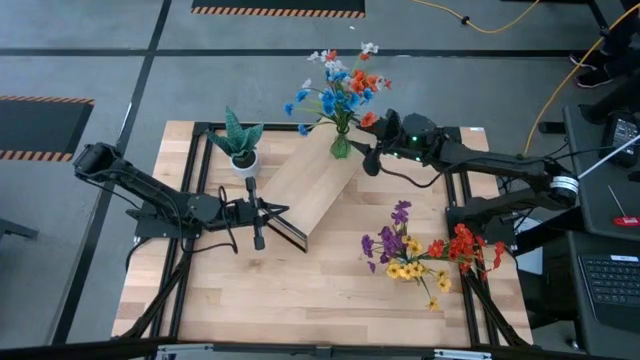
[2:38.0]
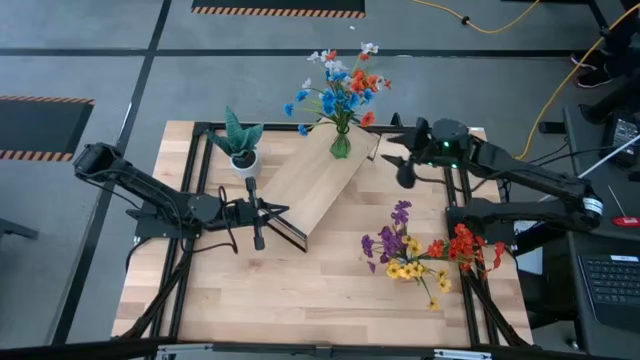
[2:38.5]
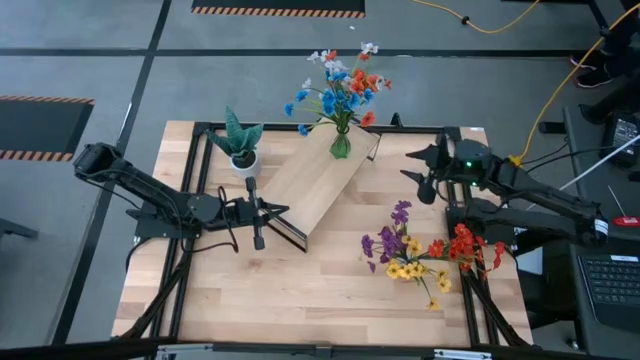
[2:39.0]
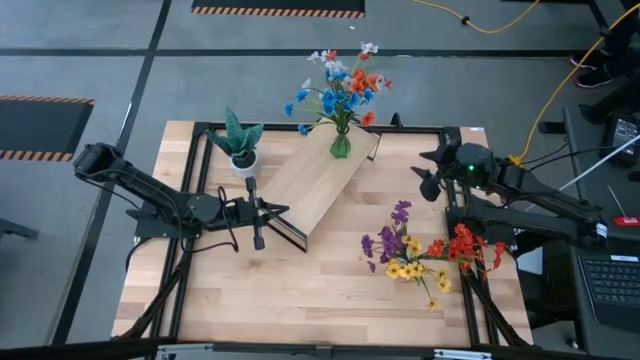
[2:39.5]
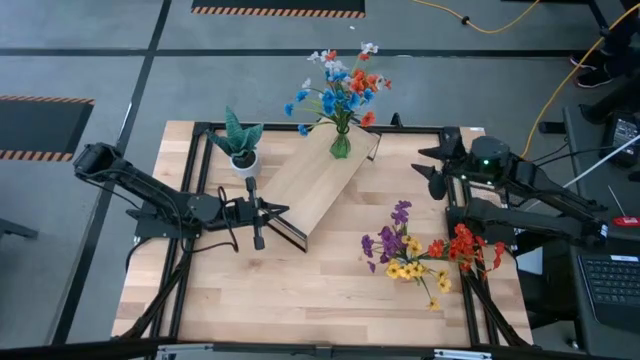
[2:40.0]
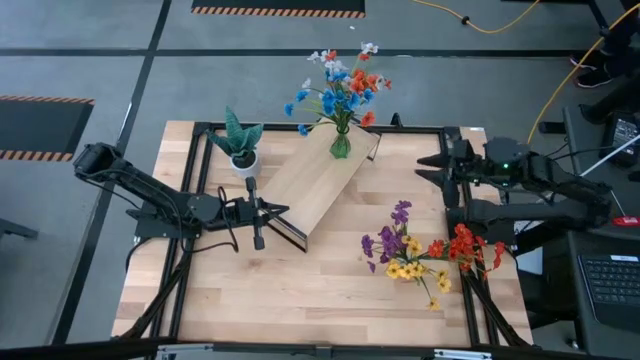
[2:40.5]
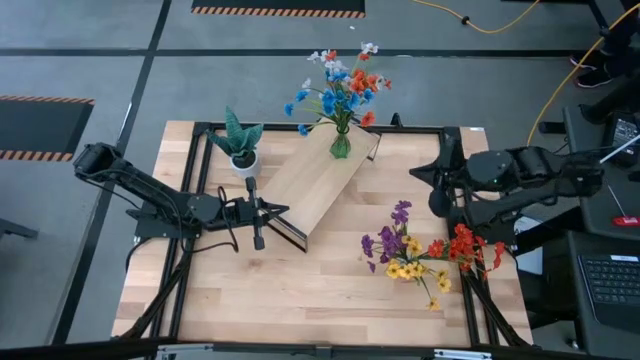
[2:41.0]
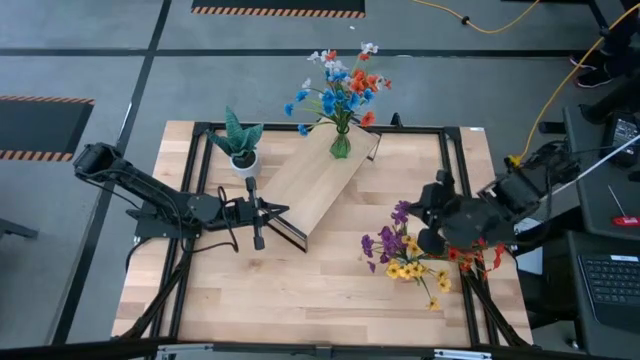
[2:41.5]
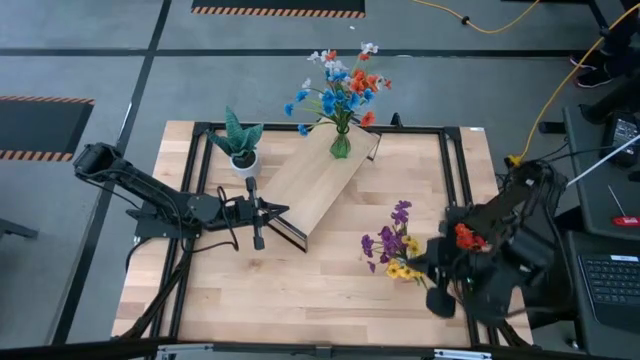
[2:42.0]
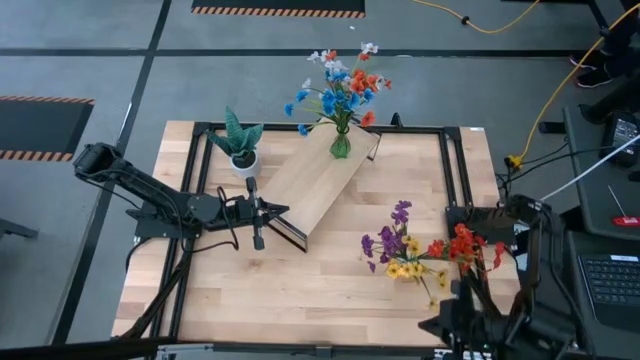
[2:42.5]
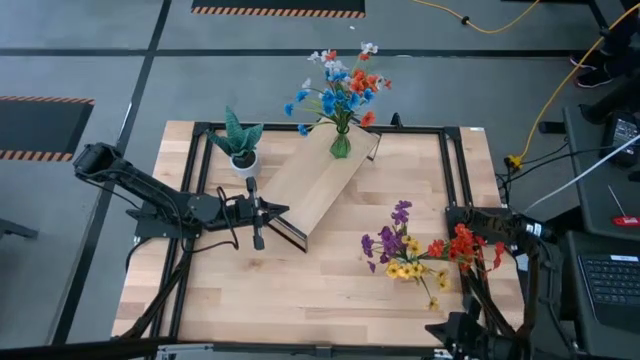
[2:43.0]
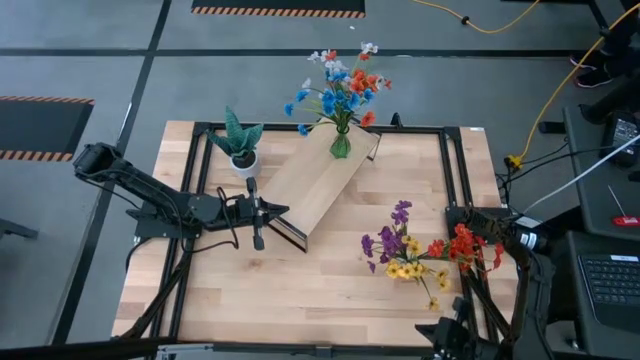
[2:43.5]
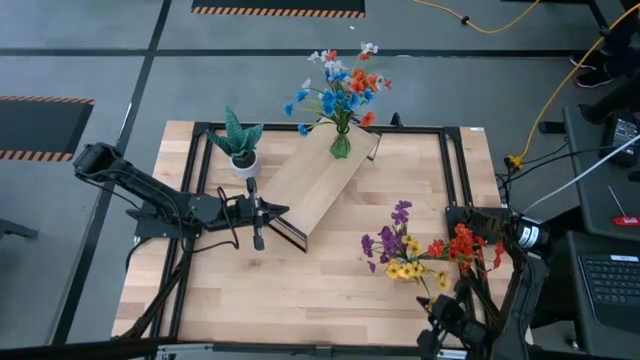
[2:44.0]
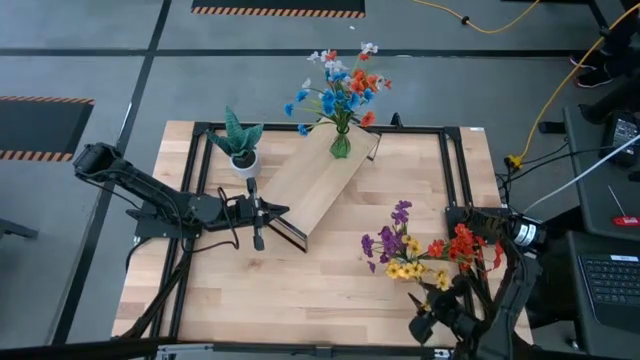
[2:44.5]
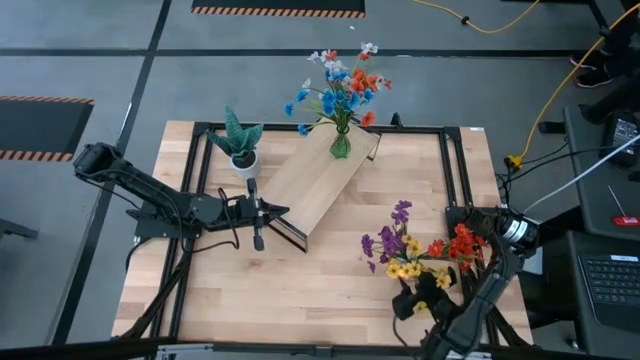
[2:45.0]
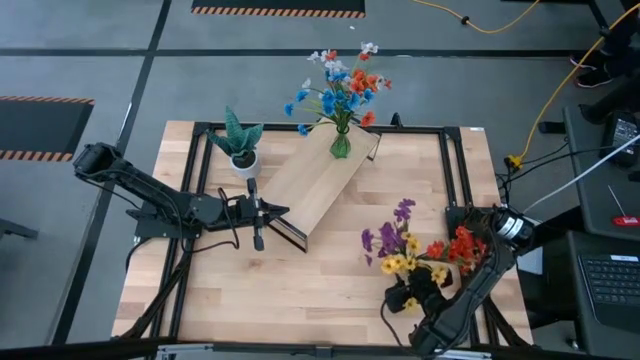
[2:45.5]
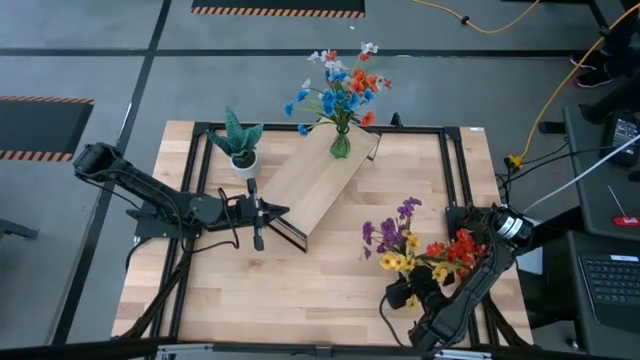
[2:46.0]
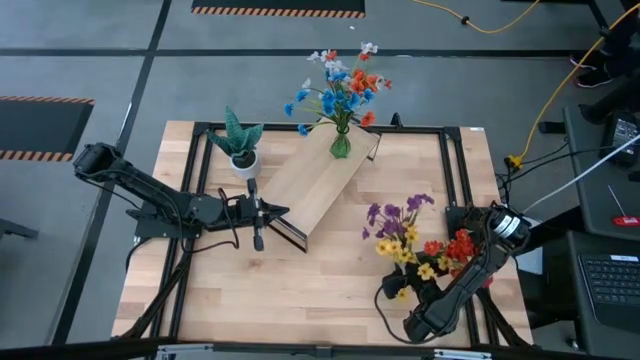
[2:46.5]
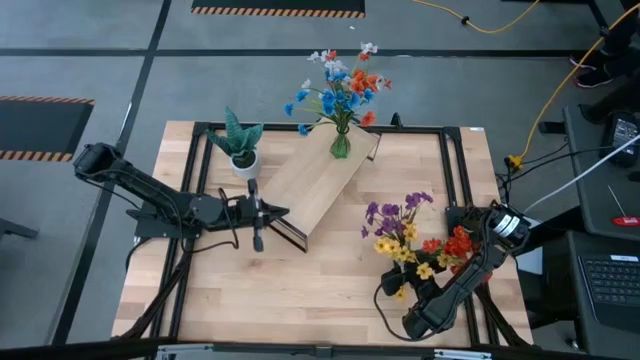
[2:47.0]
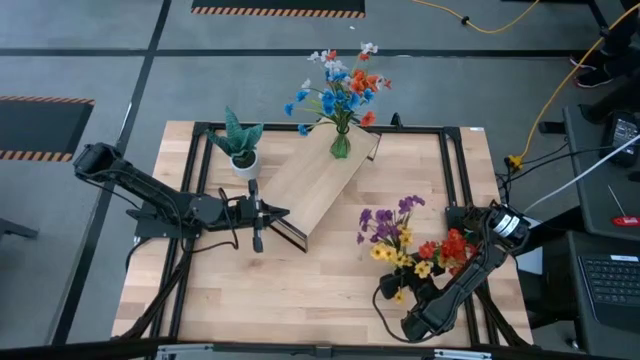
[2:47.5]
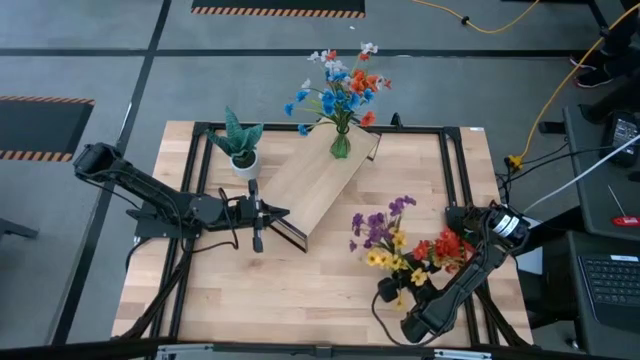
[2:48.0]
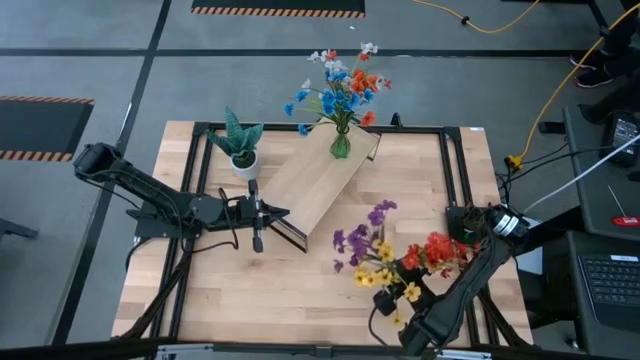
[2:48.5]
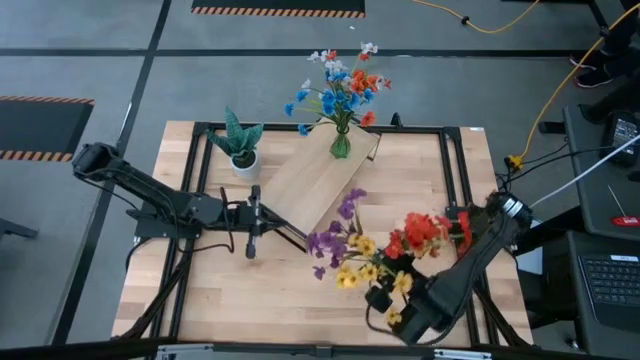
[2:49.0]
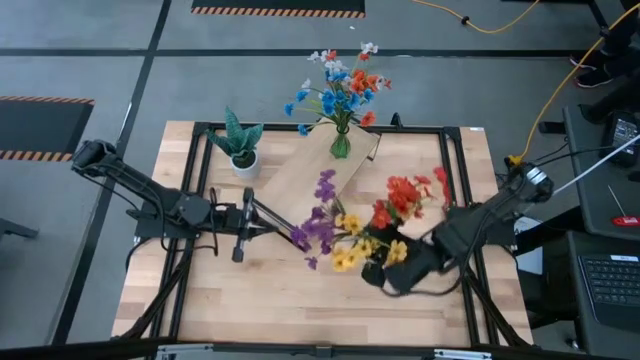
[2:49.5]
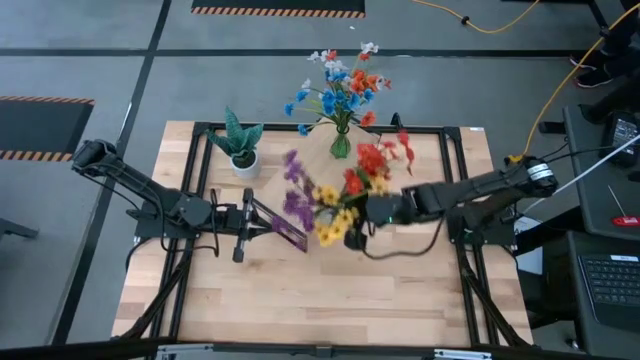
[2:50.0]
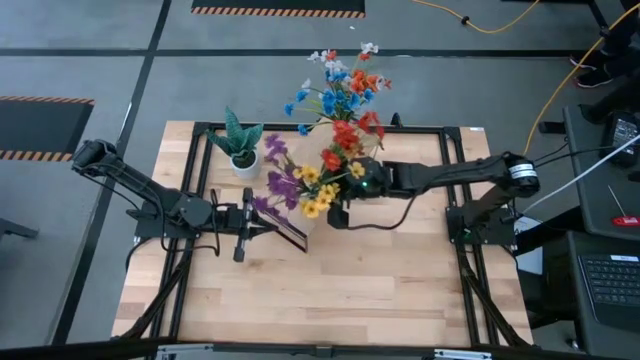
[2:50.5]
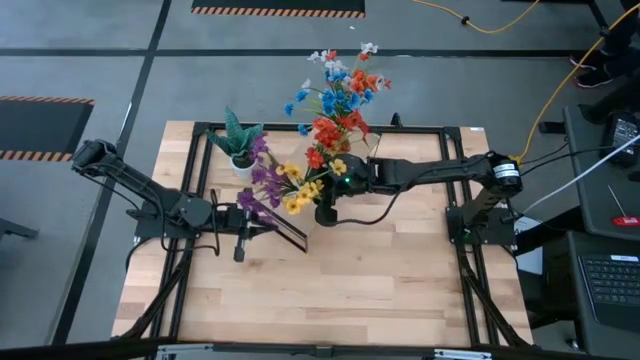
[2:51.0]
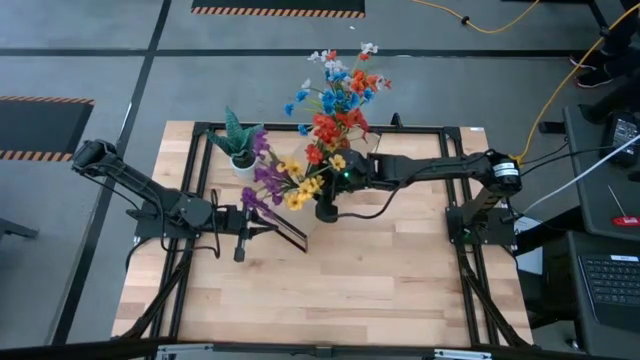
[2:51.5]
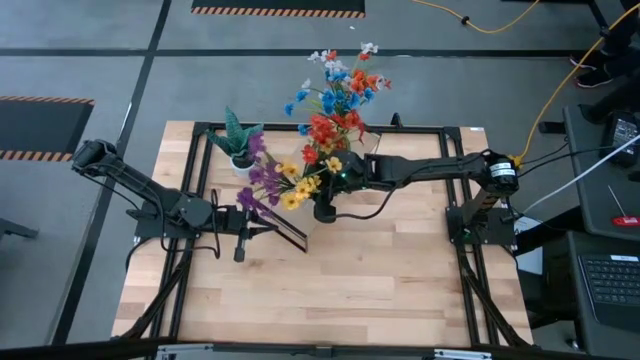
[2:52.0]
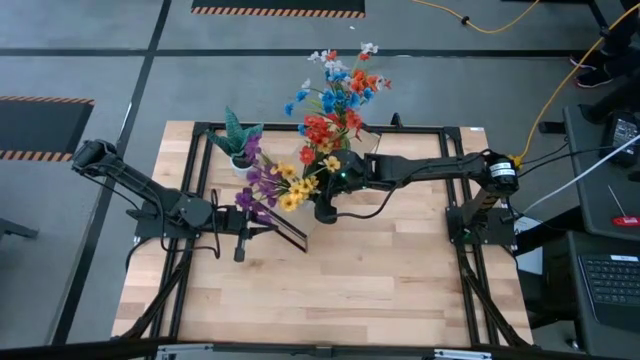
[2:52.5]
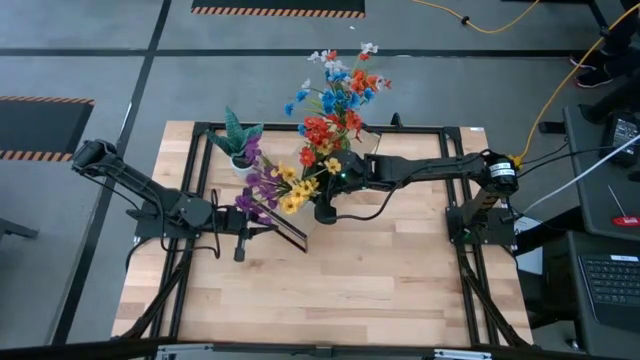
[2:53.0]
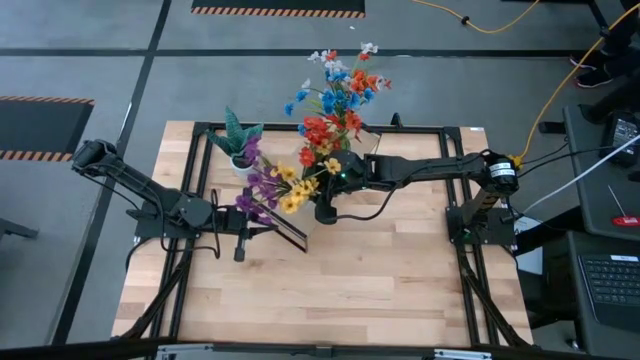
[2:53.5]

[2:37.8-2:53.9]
Task: Pick and place flowers into a vace then onto a shelf
Put the transparent vase on the shelf

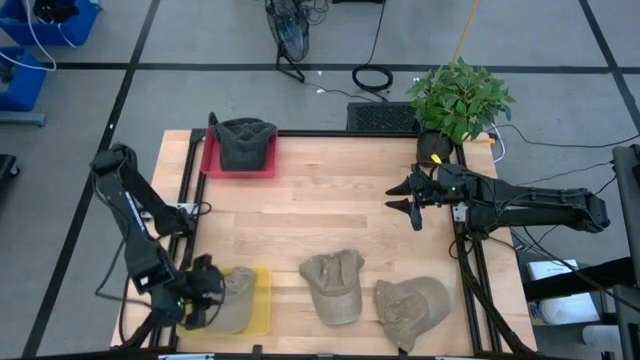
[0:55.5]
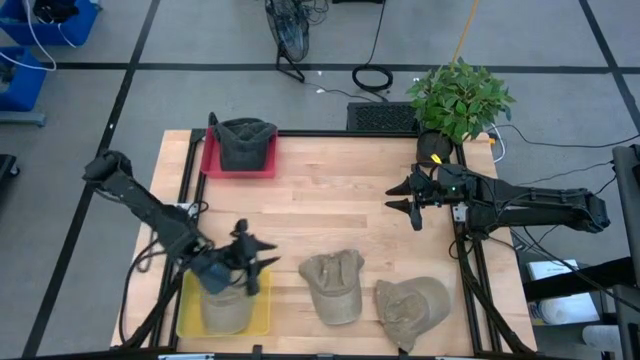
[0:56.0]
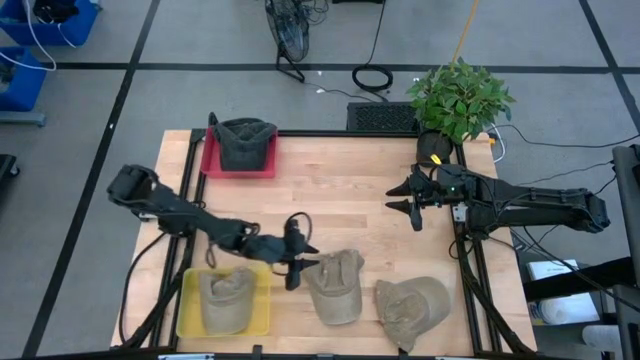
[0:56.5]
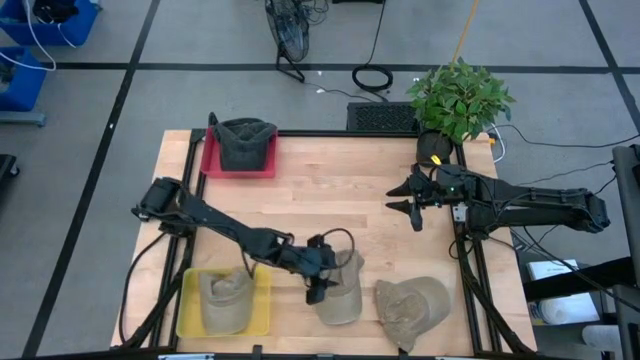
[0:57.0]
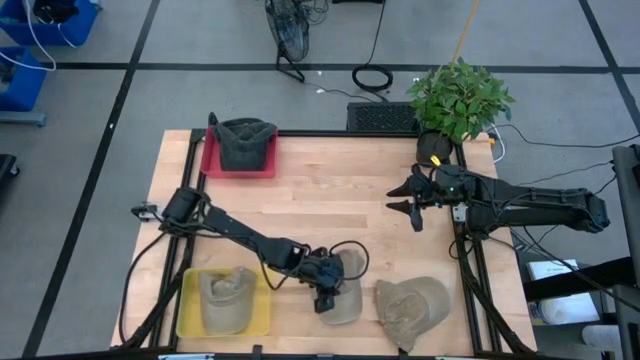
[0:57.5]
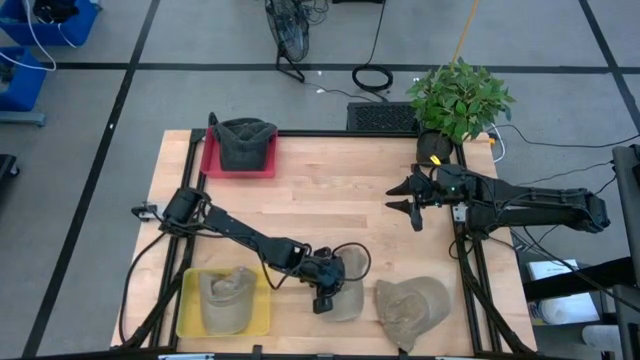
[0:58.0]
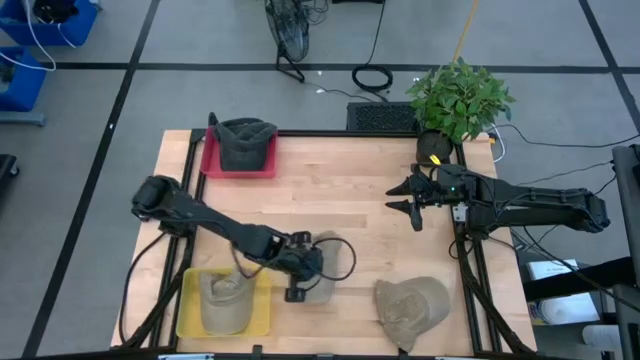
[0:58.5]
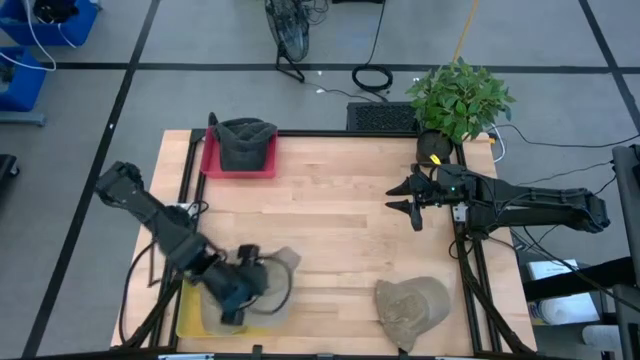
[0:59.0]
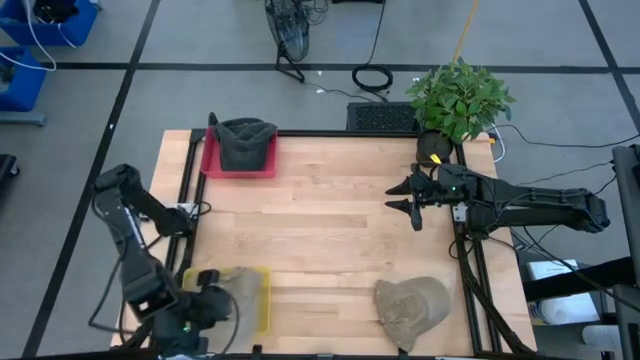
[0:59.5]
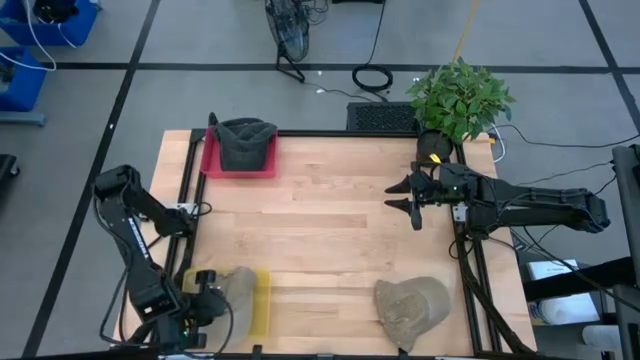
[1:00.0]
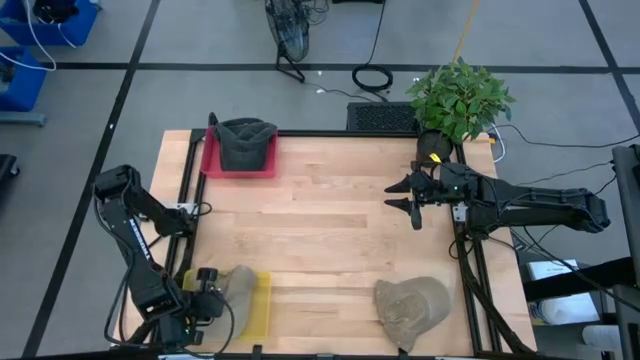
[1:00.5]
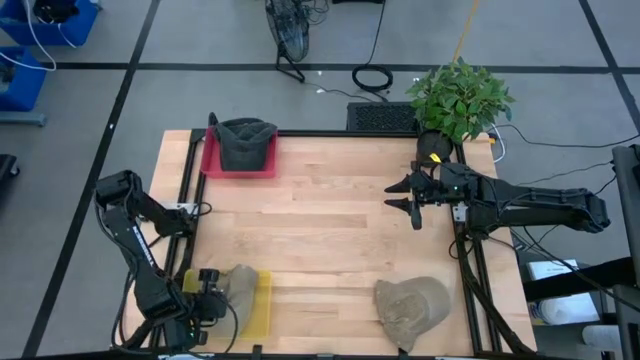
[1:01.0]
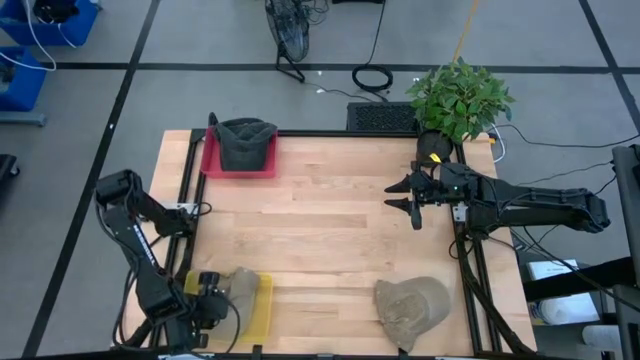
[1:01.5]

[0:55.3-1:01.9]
Task: Pick & Place hat
Put the left brown cap into the yellow bin

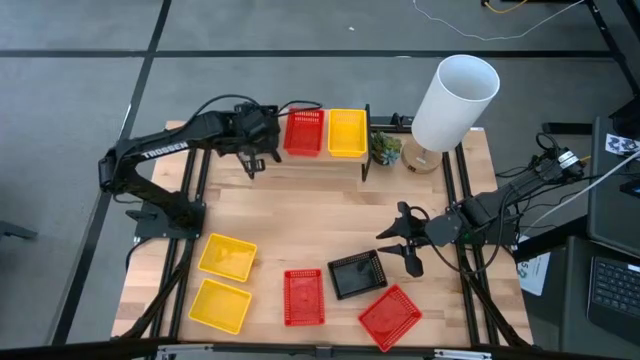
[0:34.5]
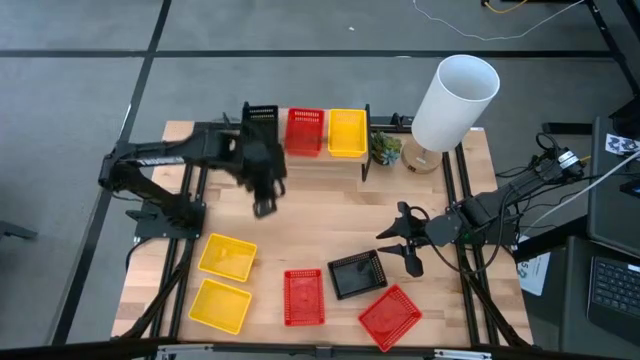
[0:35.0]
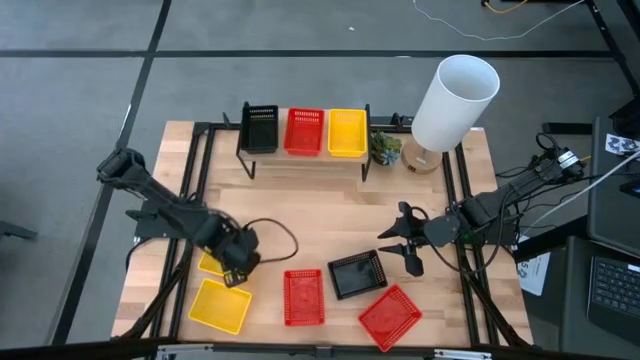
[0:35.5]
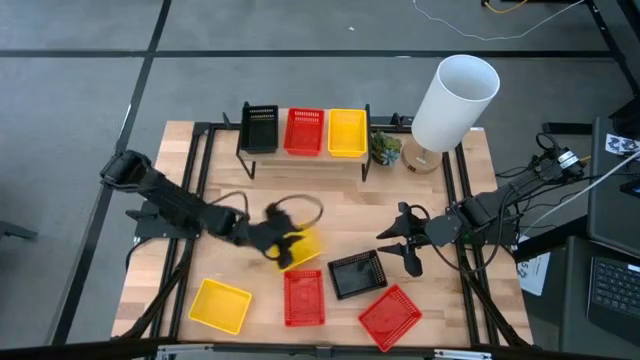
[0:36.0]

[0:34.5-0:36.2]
Task: Stack baskets on shelf by color
Move the top yellow bin to the center of the table
